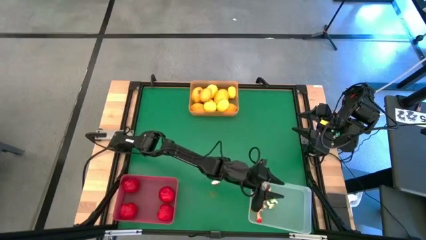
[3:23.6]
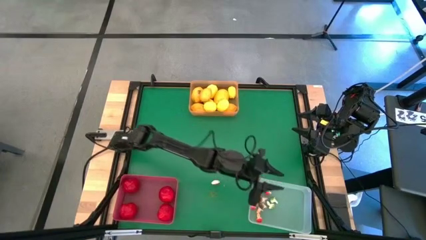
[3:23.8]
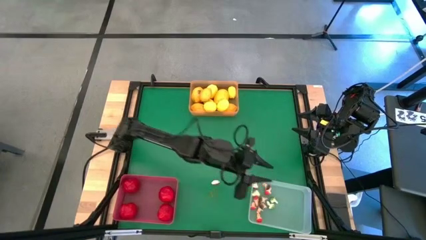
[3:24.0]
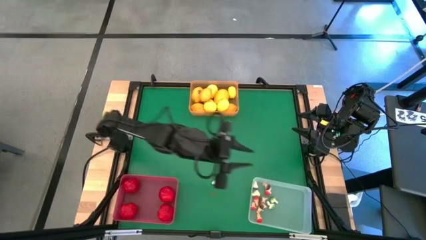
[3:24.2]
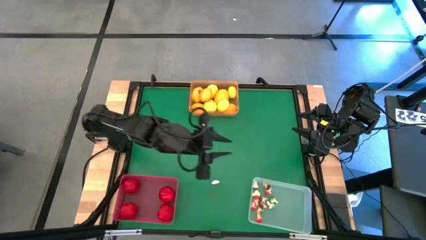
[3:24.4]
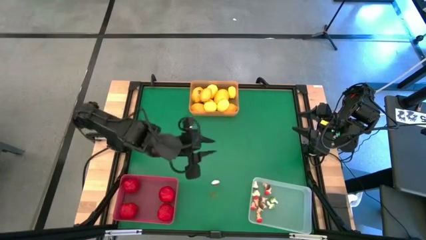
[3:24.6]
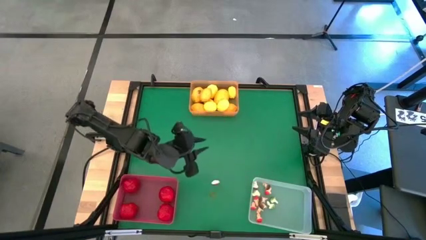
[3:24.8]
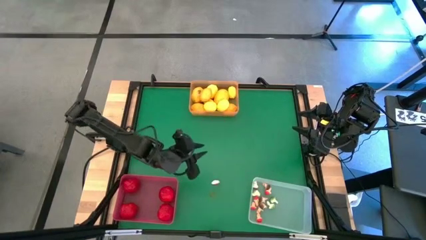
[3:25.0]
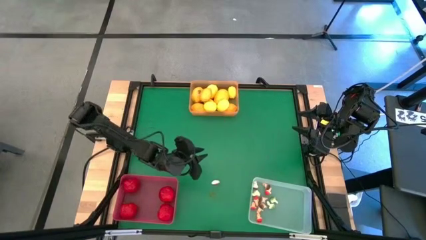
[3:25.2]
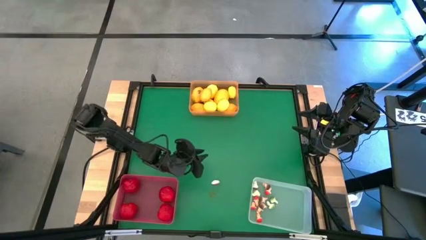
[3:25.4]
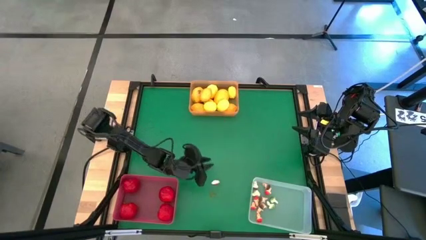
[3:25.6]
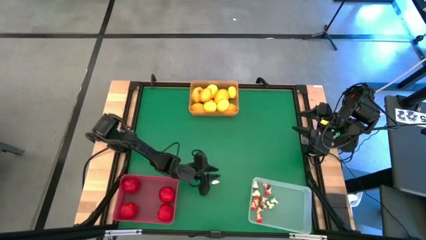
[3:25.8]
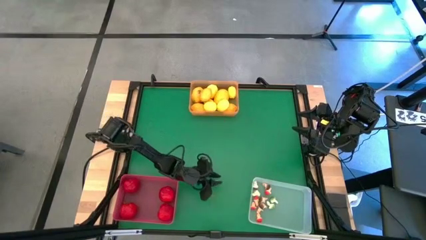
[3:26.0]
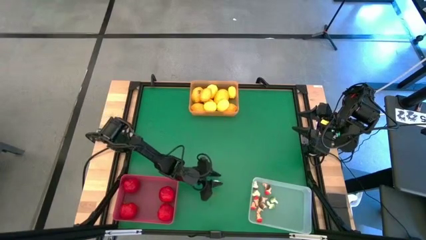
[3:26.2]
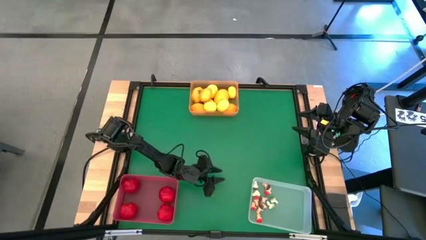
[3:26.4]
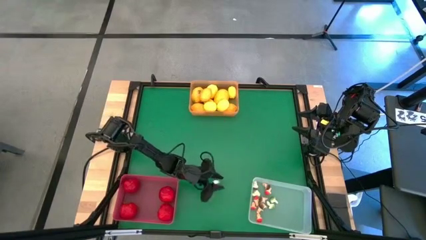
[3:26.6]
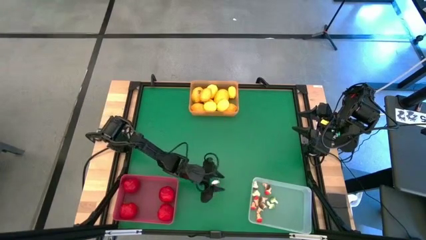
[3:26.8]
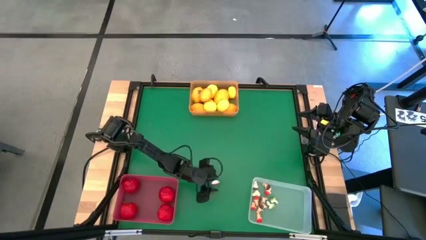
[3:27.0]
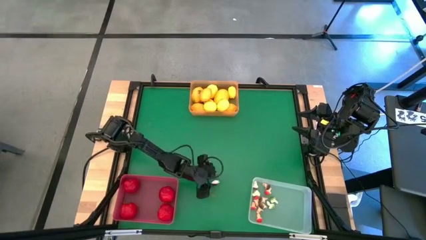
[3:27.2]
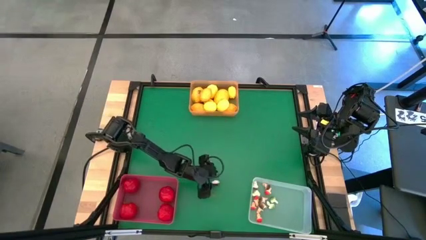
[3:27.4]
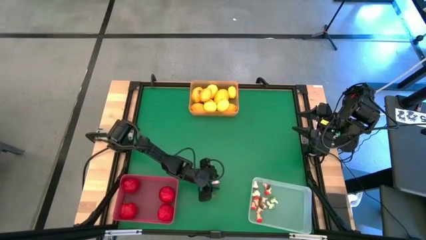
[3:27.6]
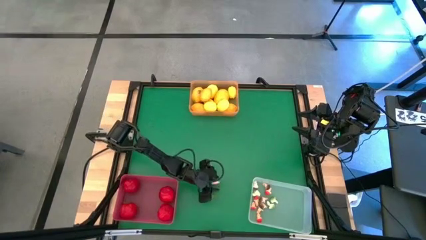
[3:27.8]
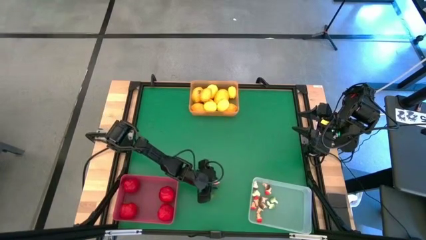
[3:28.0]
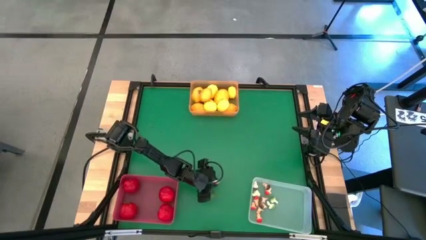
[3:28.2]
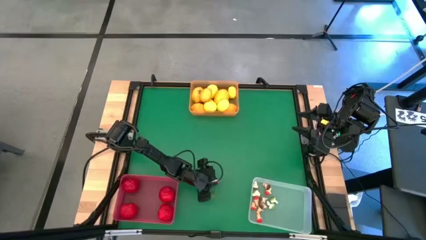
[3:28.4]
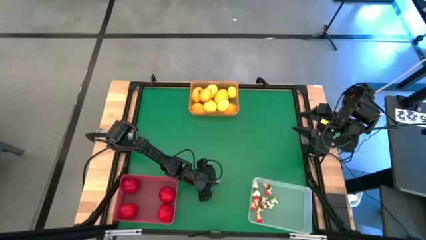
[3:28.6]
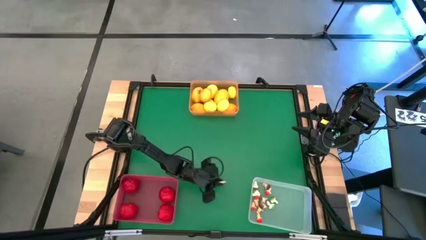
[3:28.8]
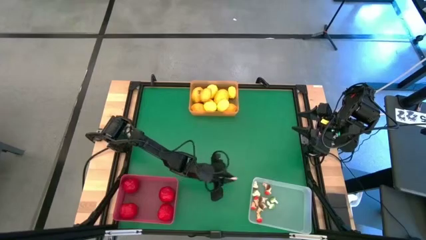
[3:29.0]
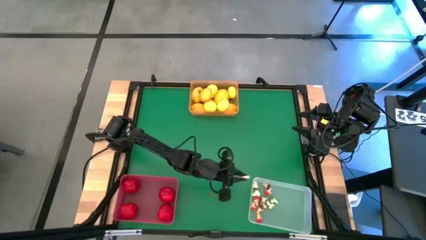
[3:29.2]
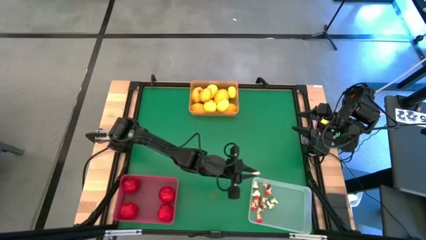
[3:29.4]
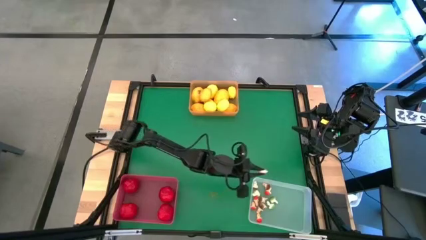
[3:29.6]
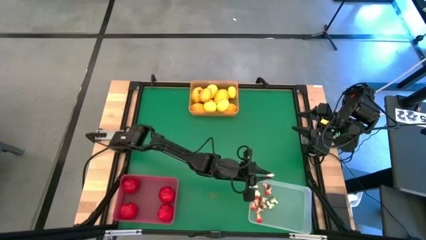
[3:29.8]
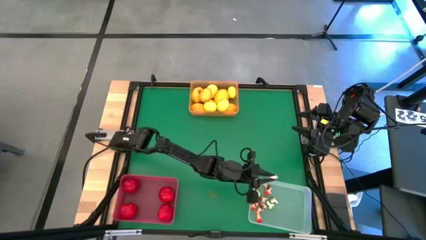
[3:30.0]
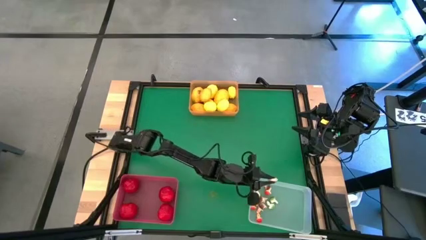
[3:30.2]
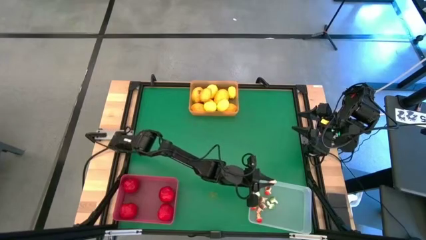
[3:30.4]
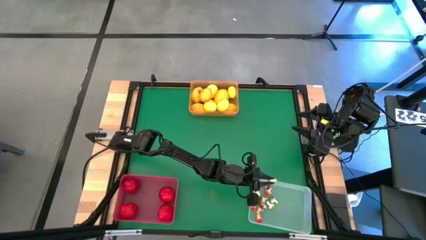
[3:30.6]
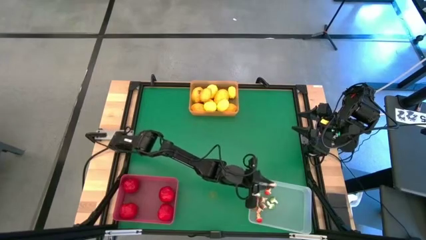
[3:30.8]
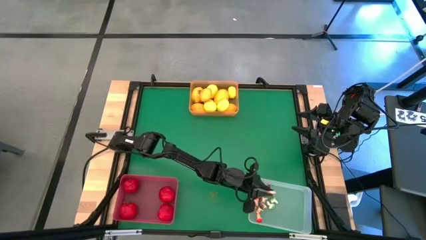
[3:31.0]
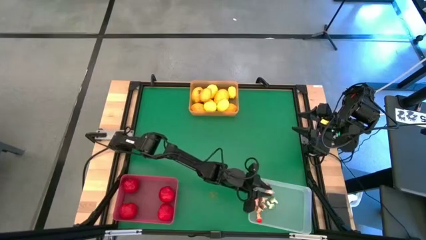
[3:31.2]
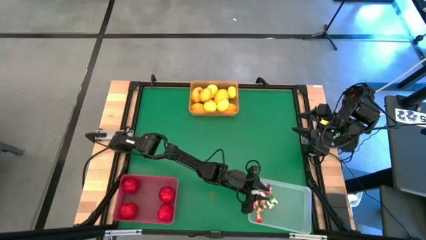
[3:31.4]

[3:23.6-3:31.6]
Task: Sort produce into baskets
Put the brown mushroom into the transparent bin
